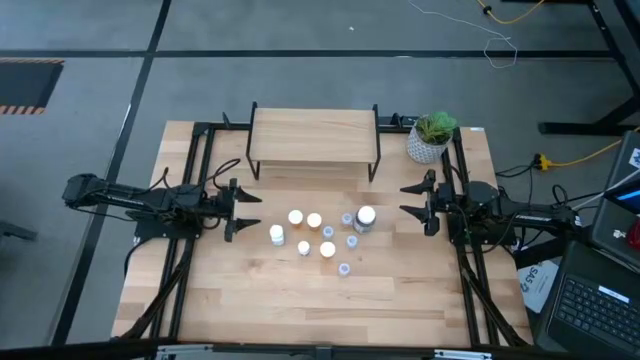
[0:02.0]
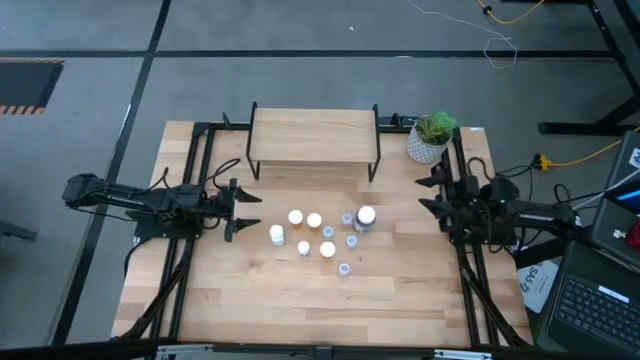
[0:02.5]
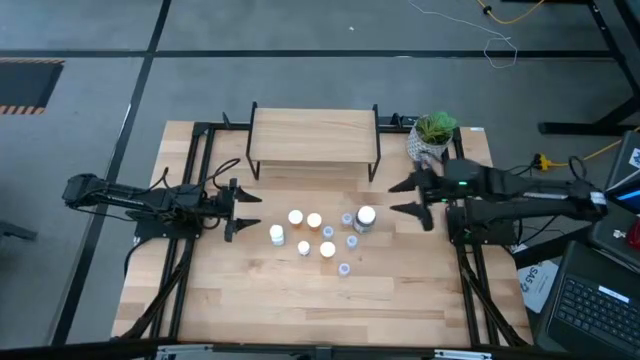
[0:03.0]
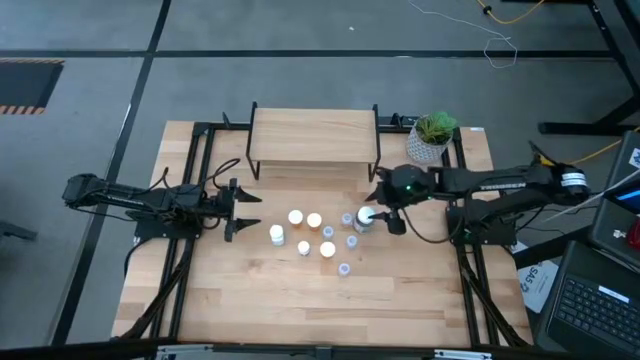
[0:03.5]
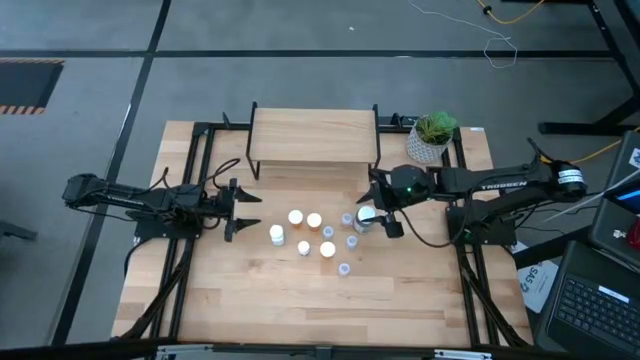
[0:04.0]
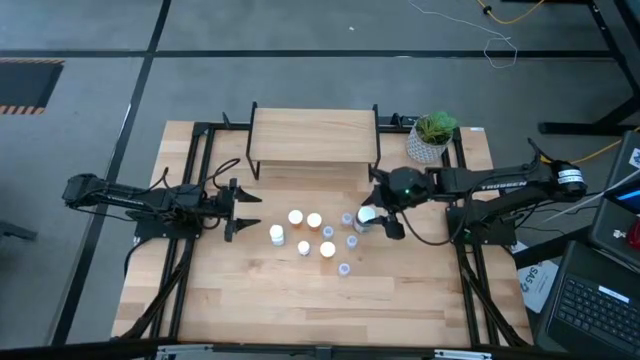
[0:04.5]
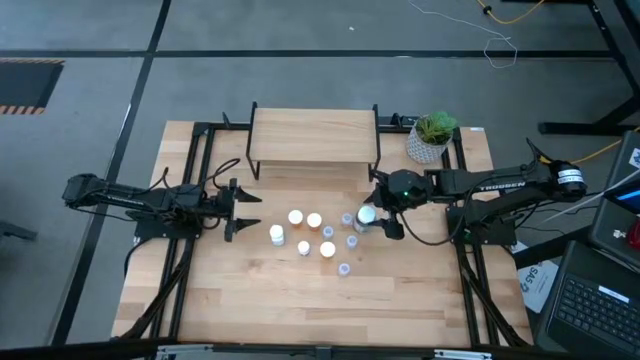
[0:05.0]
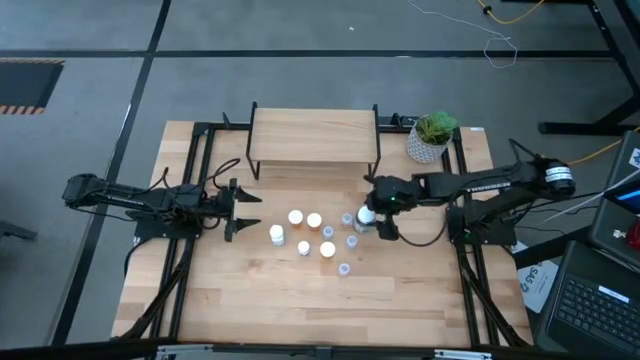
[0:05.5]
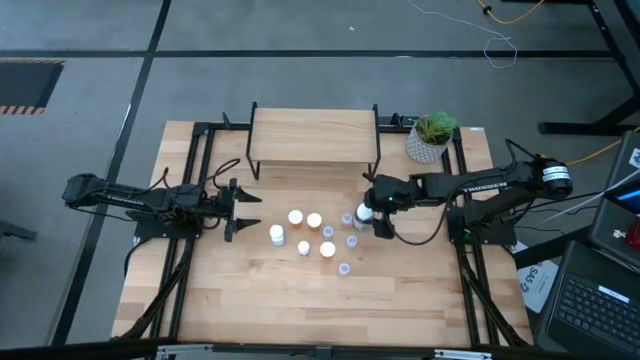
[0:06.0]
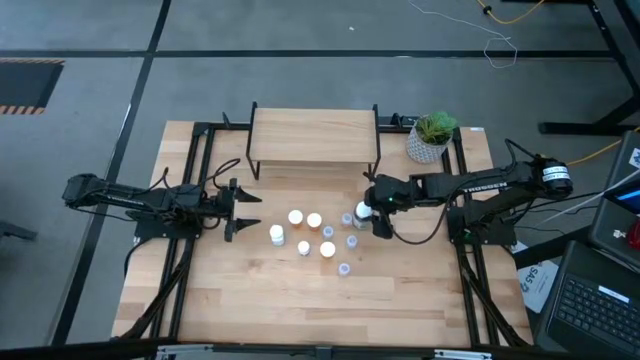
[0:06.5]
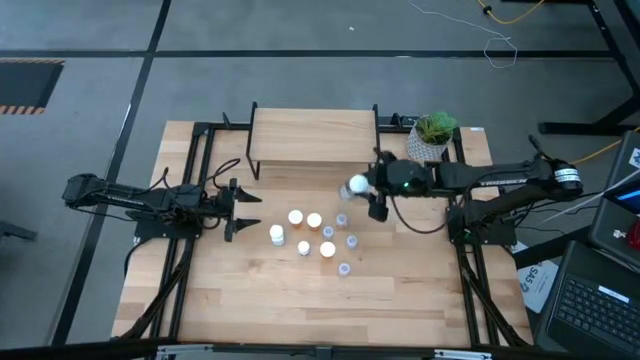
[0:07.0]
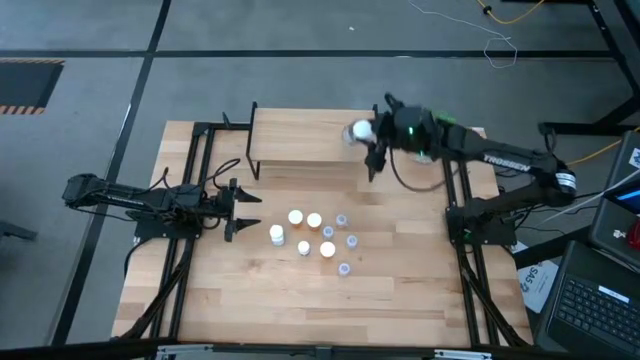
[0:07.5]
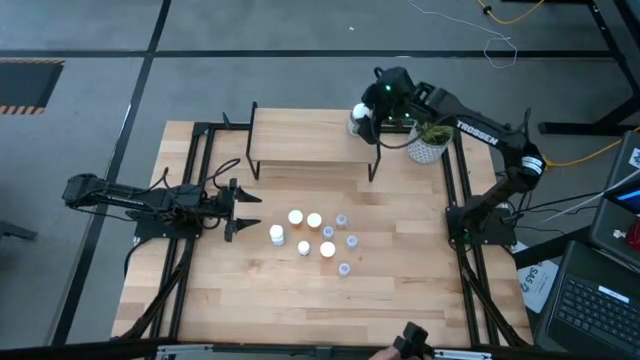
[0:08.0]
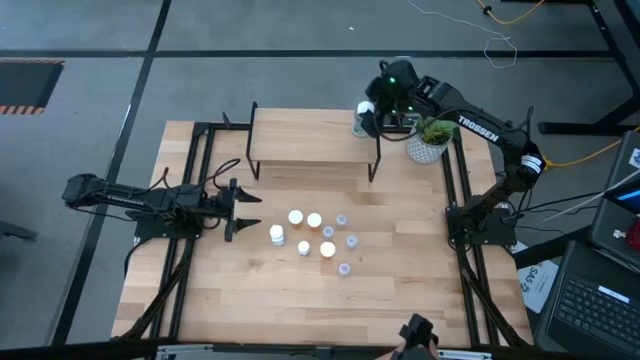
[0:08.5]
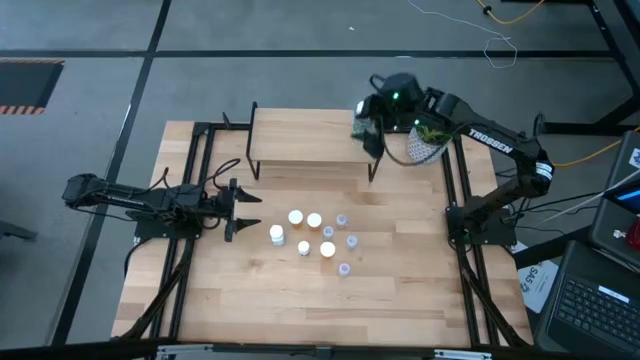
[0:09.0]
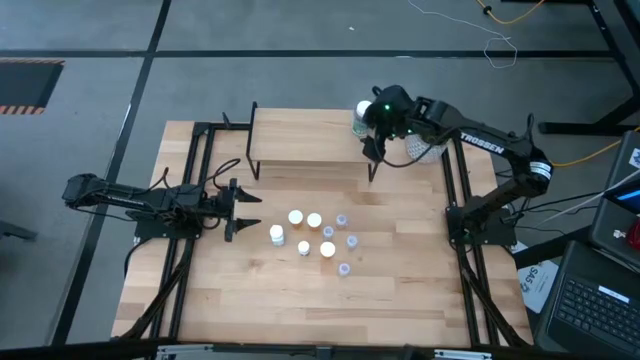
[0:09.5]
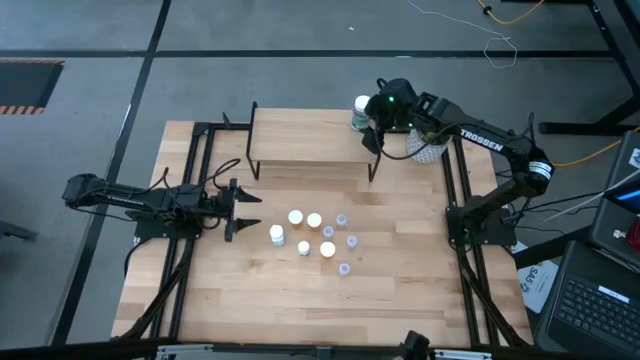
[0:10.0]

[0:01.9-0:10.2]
Task: Pick and place medicine bottles onto shelf by color
Put the green medicine bottle on the shelf

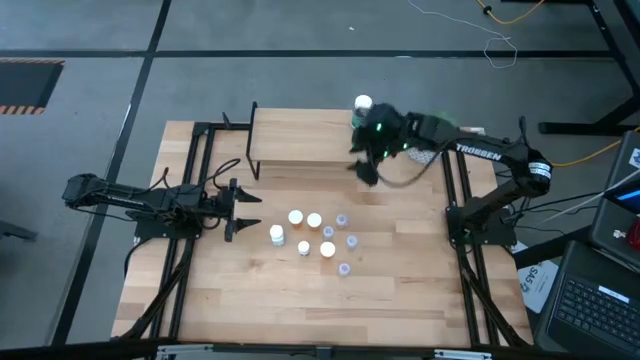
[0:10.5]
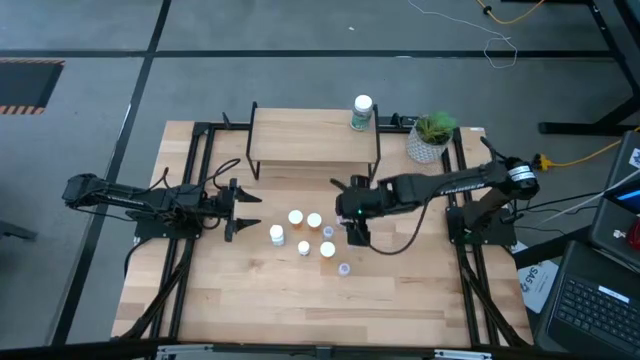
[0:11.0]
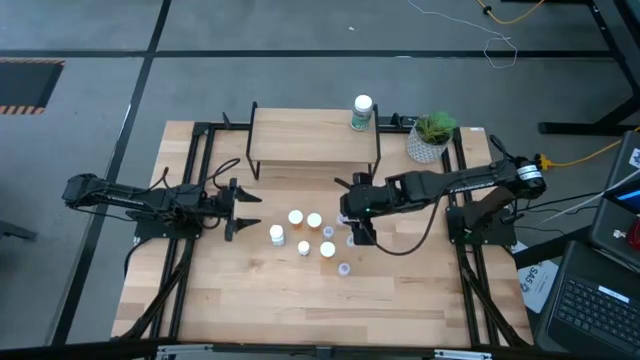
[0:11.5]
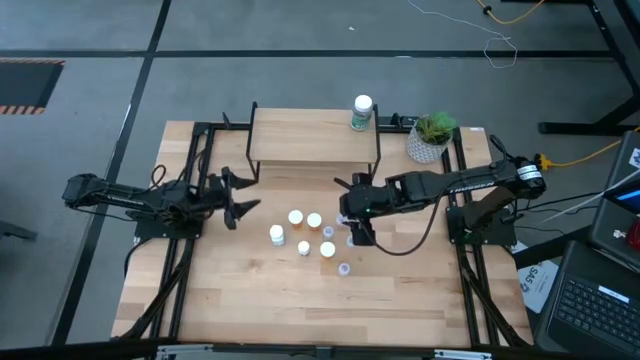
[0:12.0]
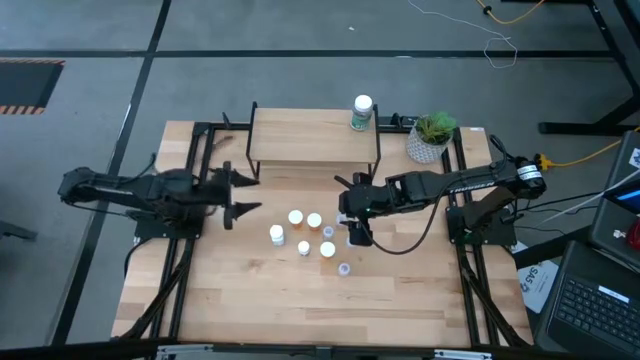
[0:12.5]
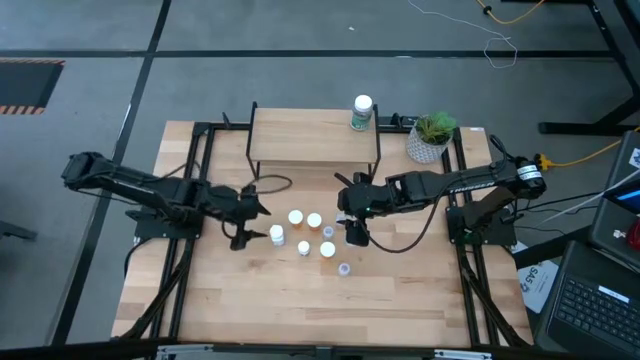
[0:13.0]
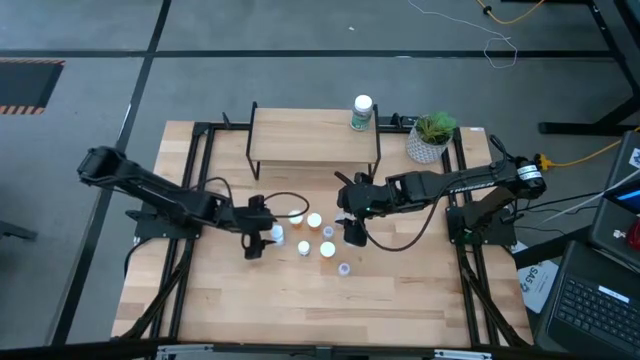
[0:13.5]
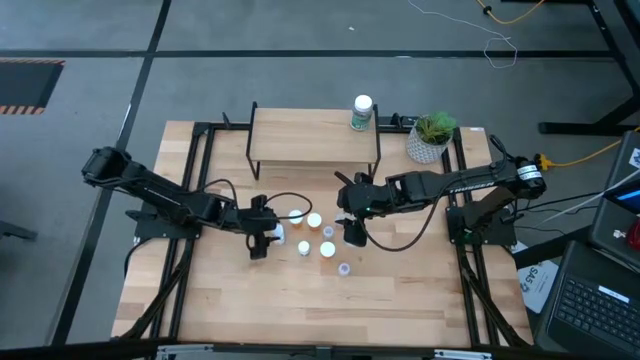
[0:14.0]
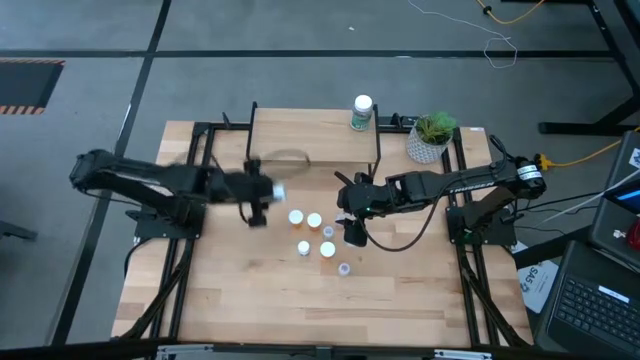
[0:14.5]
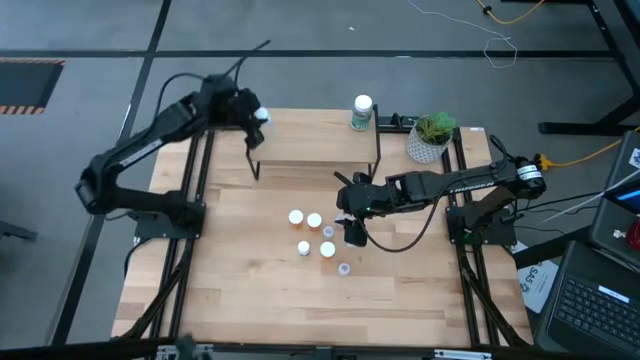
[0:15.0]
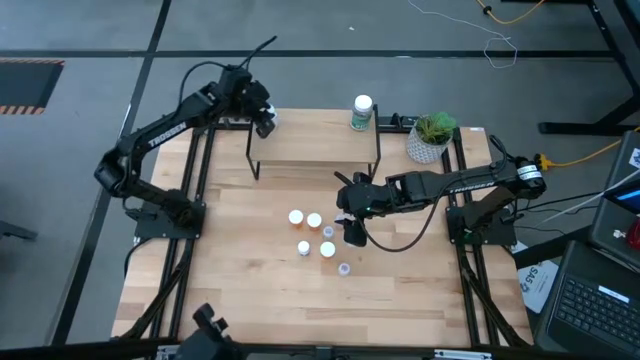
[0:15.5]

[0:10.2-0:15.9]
Put the big white medicine bottle on the shelf

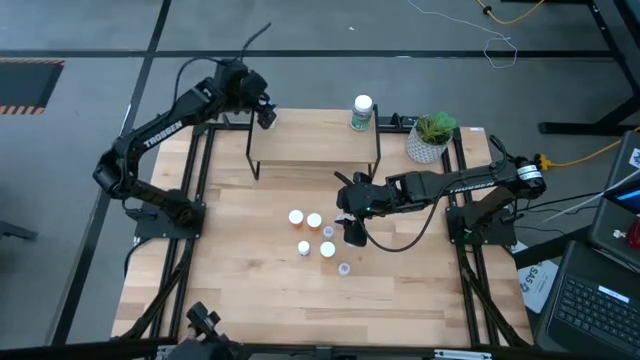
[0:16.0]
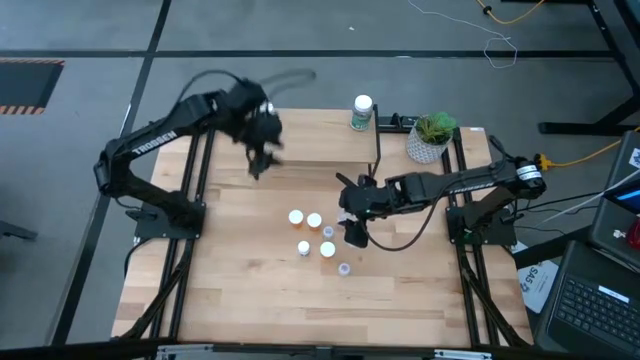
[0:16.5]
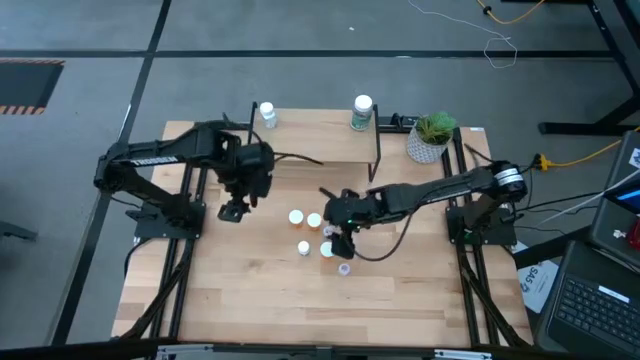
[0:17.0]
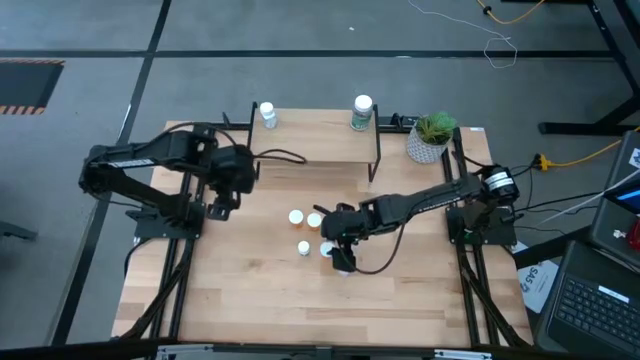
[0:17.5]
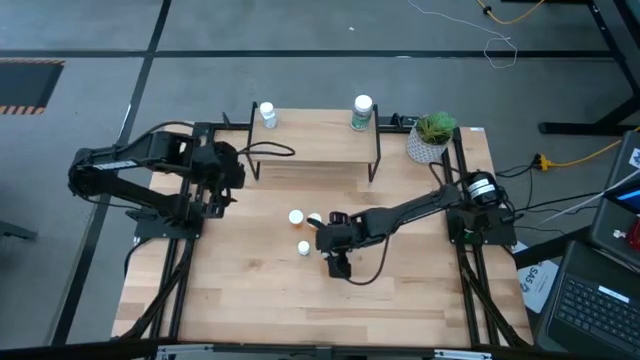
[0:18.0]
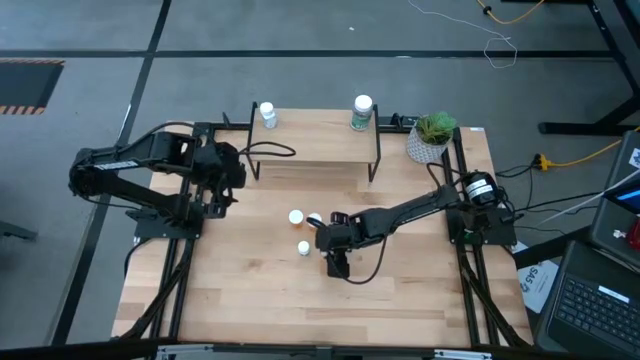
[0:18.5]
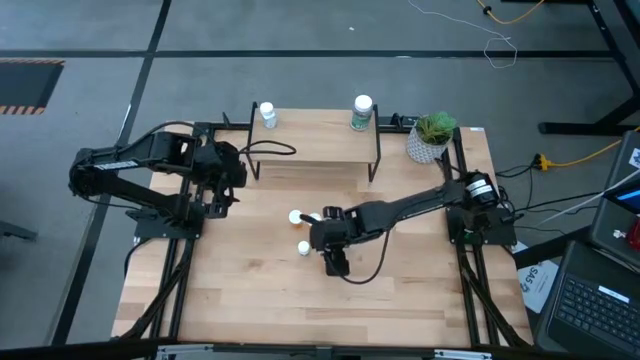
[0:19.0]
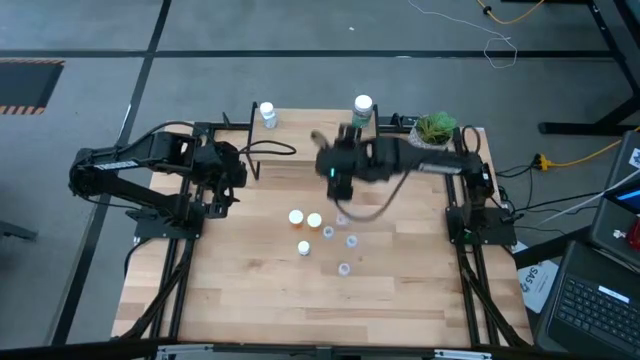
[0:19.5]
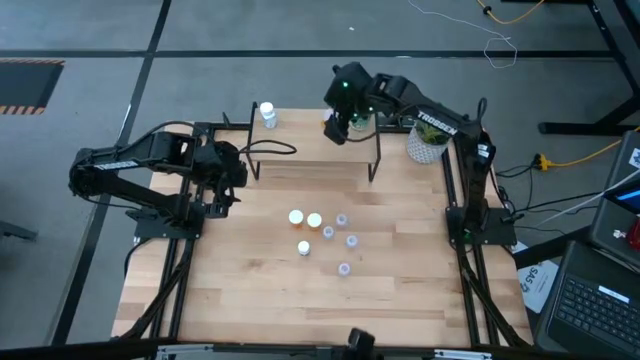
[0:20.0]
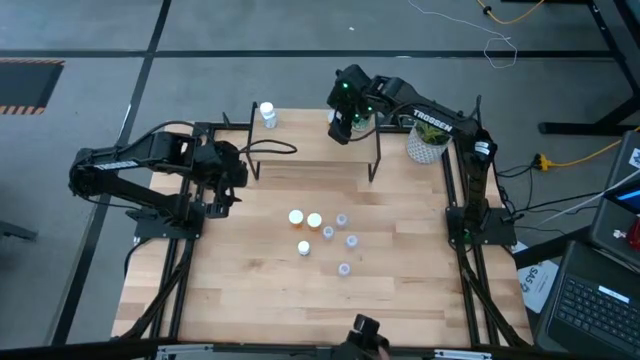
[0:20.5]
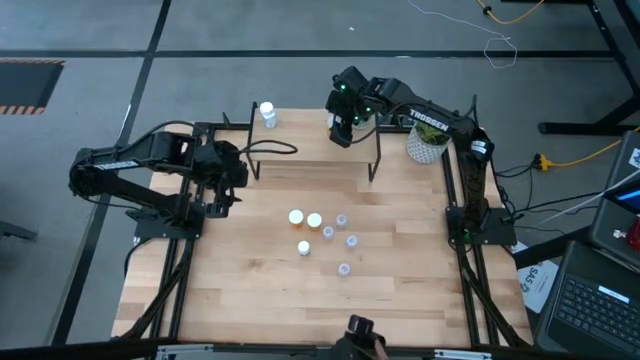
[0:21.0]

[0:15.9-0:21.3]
Put the bottom orange medicine bottle on the shelf

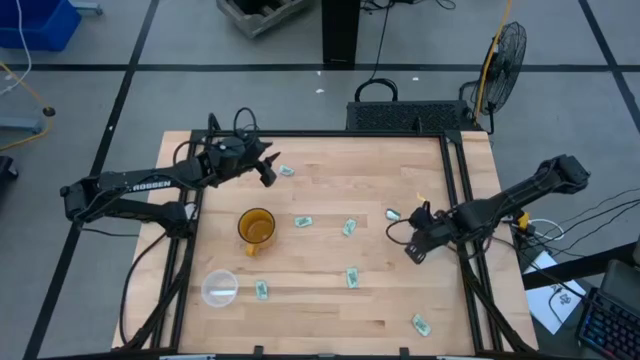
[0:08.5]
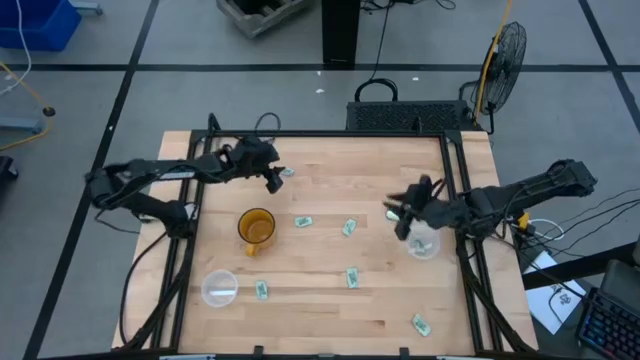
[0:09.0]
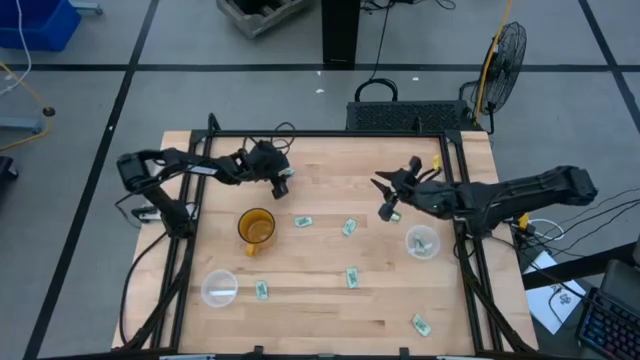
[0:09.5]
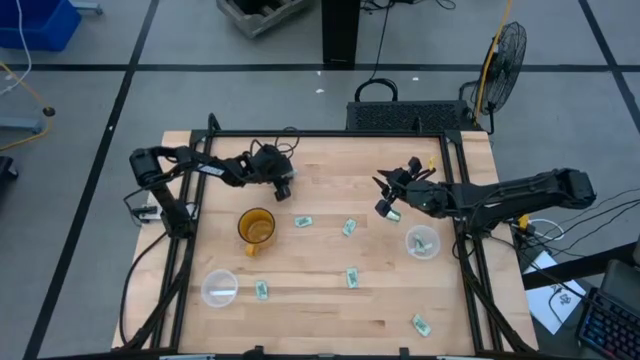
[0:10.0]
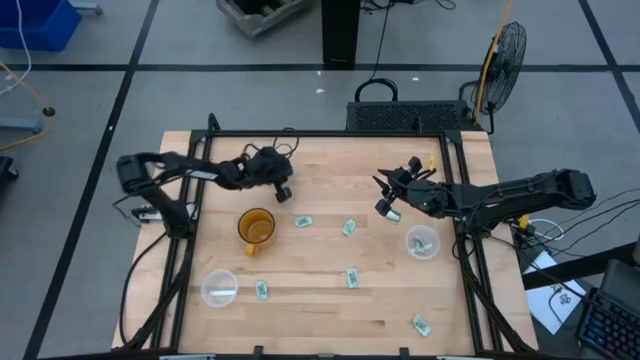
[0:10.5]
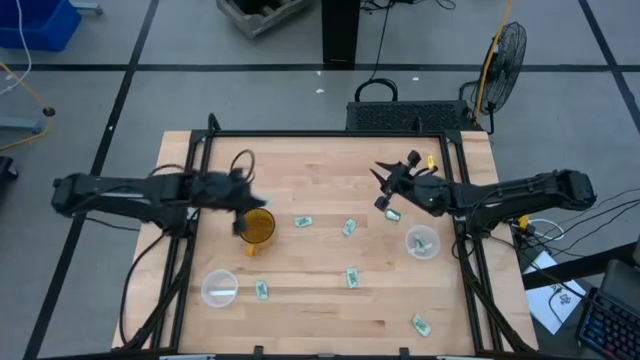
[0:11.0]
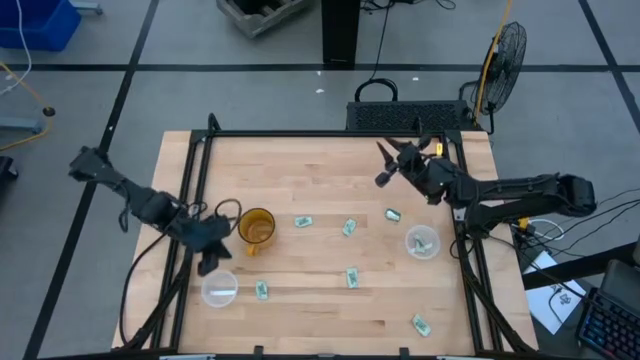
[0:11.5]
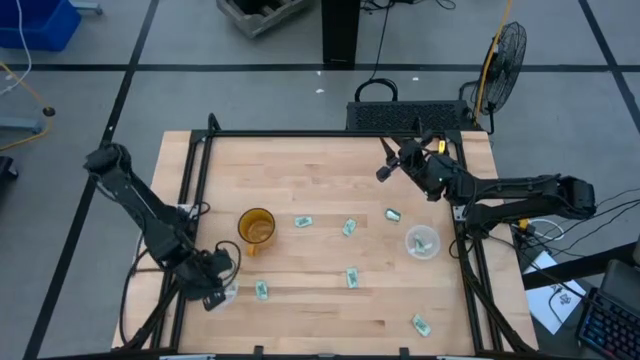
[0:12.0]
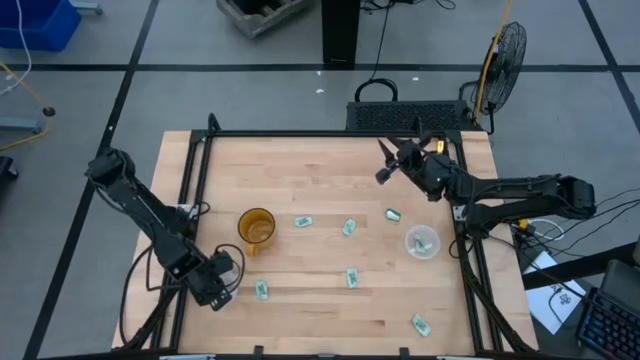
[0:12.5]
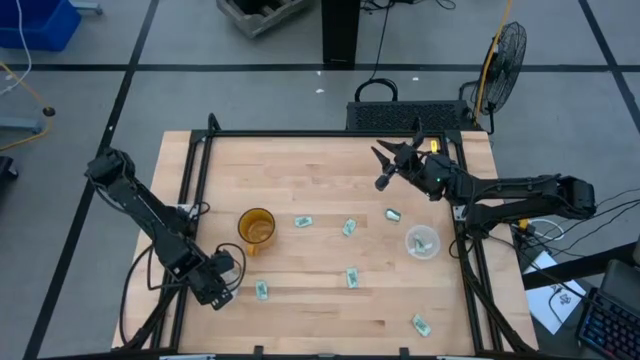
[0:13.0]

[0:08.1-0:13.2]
Task: Pick and place Stevia / Truvia into bins
Put the stevia packet into the left transparent container
